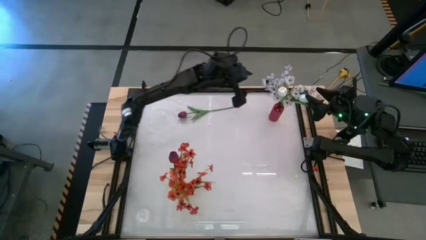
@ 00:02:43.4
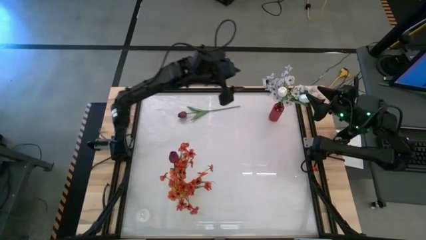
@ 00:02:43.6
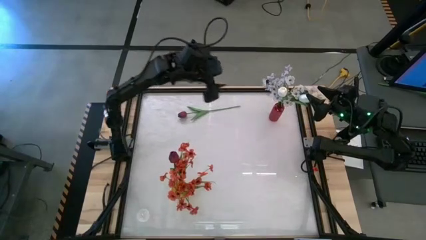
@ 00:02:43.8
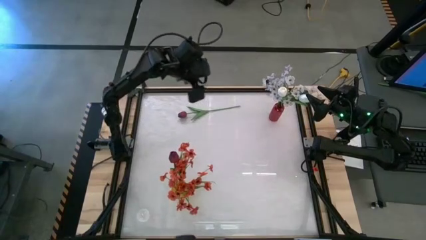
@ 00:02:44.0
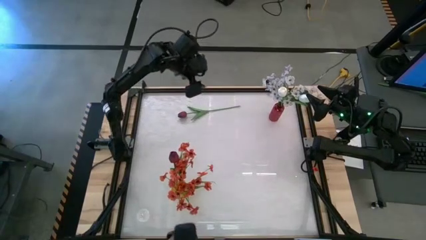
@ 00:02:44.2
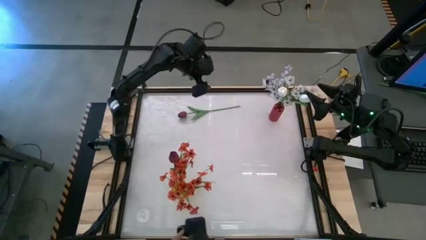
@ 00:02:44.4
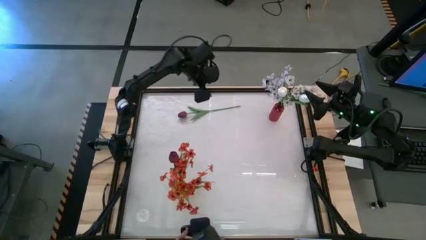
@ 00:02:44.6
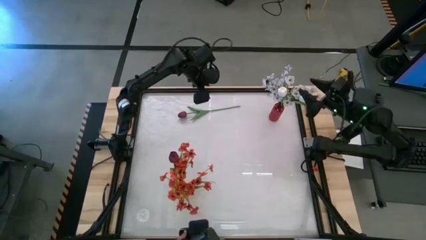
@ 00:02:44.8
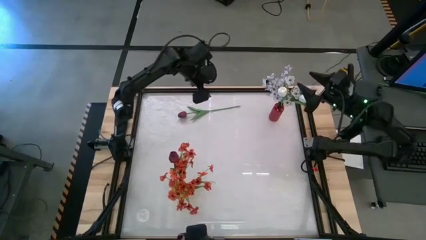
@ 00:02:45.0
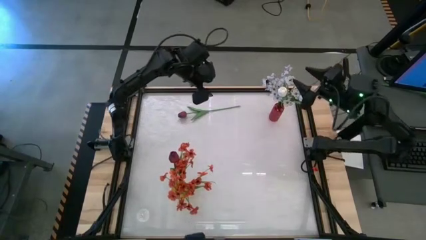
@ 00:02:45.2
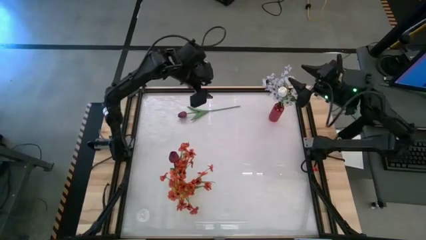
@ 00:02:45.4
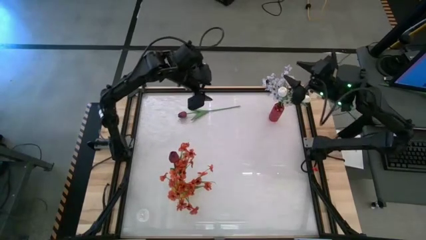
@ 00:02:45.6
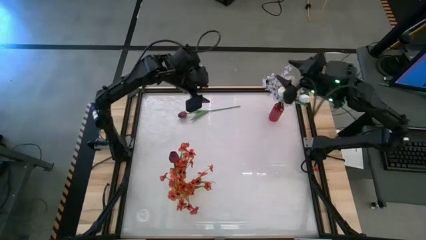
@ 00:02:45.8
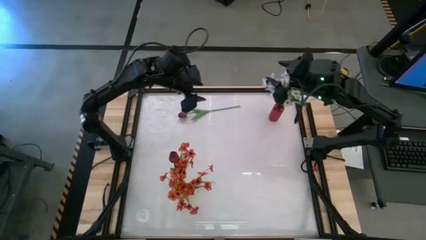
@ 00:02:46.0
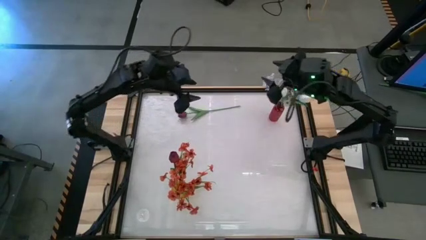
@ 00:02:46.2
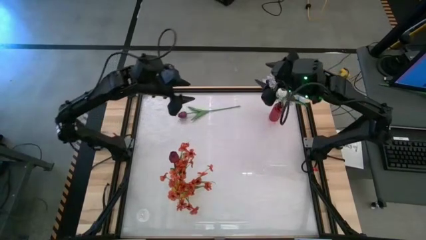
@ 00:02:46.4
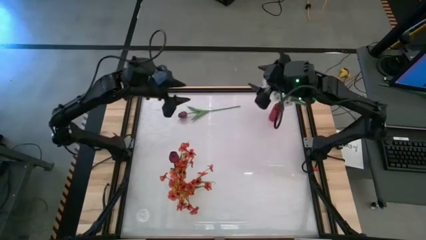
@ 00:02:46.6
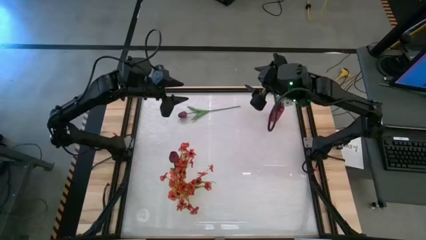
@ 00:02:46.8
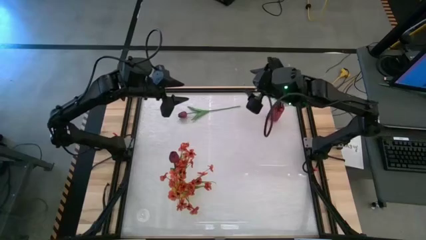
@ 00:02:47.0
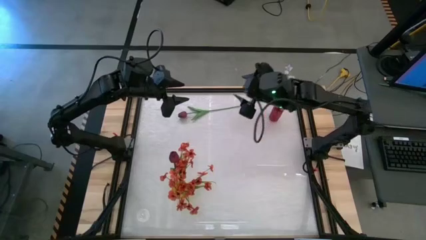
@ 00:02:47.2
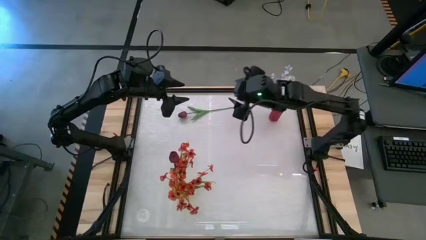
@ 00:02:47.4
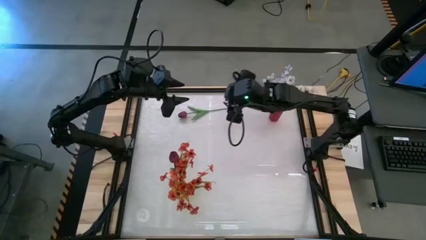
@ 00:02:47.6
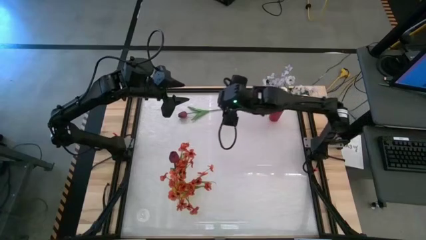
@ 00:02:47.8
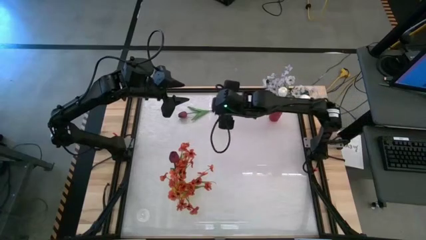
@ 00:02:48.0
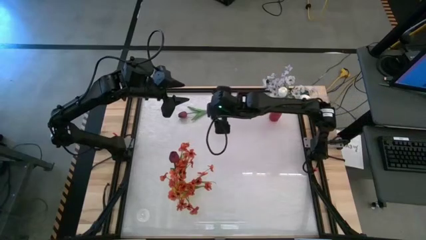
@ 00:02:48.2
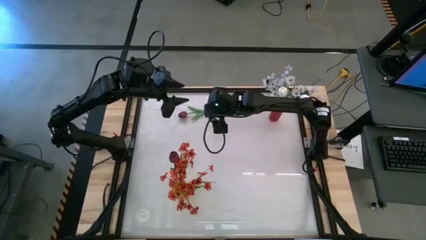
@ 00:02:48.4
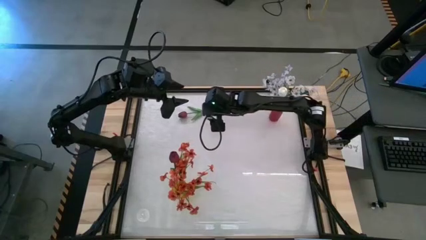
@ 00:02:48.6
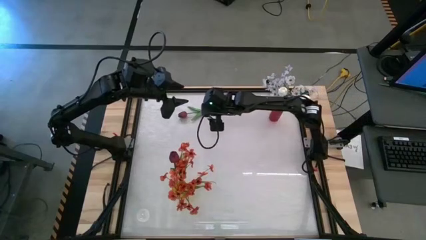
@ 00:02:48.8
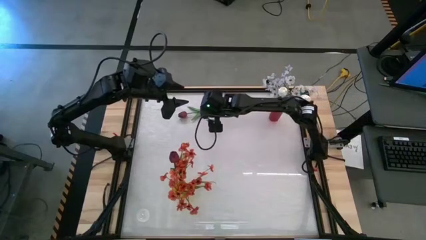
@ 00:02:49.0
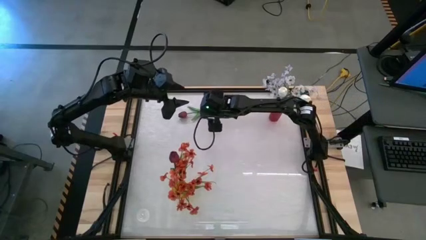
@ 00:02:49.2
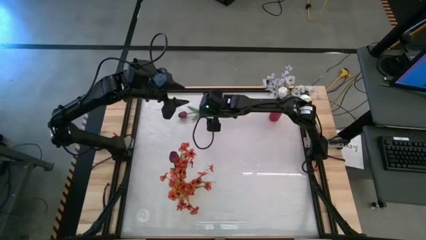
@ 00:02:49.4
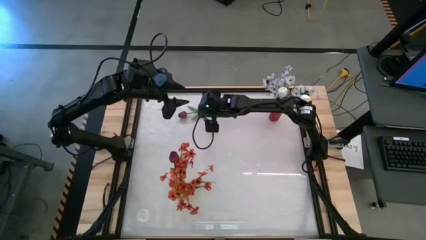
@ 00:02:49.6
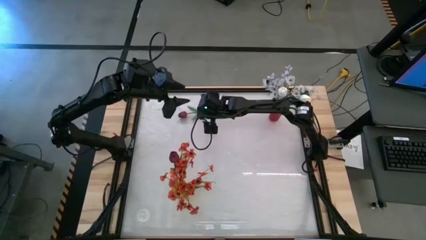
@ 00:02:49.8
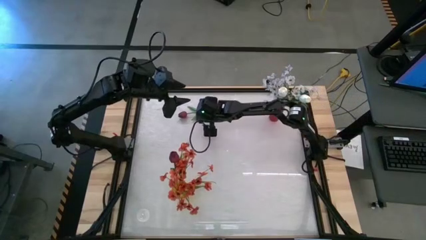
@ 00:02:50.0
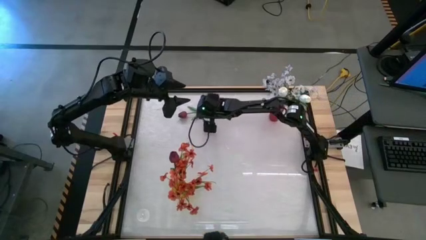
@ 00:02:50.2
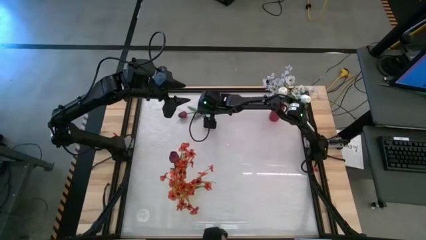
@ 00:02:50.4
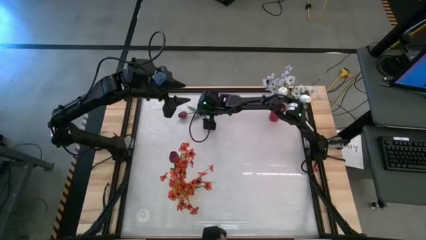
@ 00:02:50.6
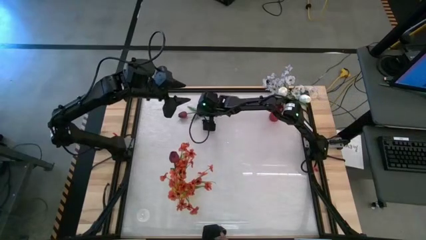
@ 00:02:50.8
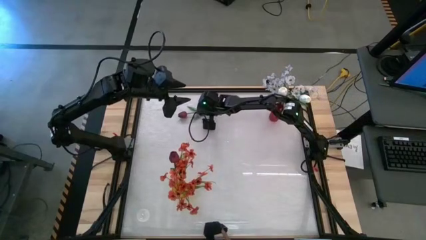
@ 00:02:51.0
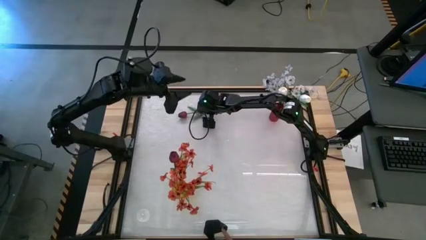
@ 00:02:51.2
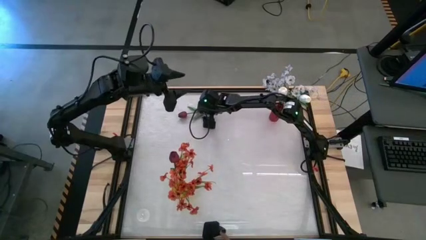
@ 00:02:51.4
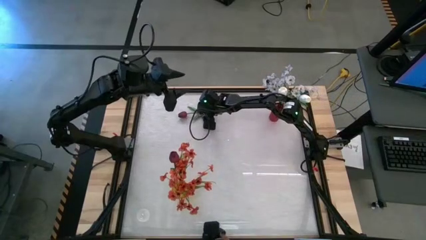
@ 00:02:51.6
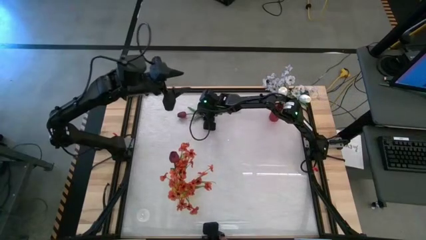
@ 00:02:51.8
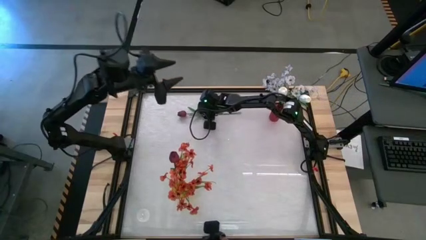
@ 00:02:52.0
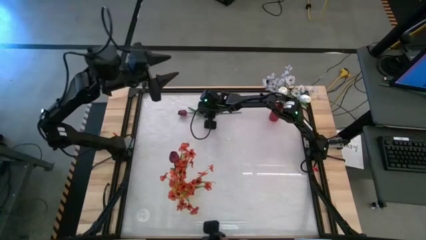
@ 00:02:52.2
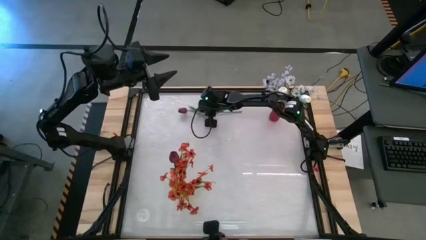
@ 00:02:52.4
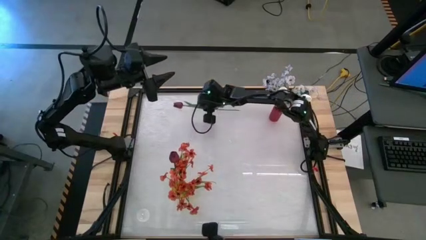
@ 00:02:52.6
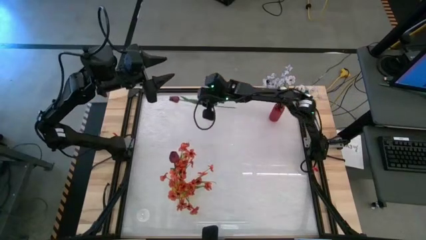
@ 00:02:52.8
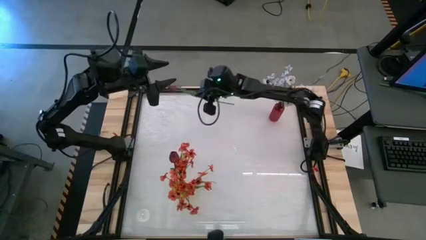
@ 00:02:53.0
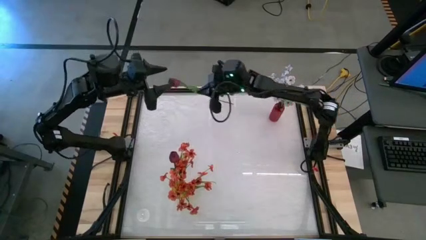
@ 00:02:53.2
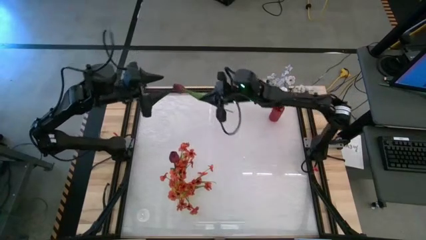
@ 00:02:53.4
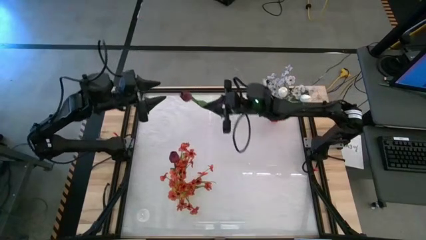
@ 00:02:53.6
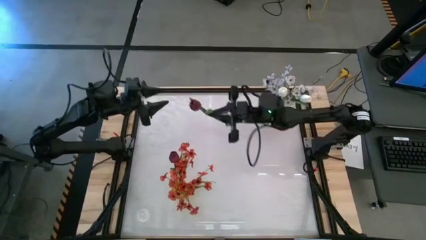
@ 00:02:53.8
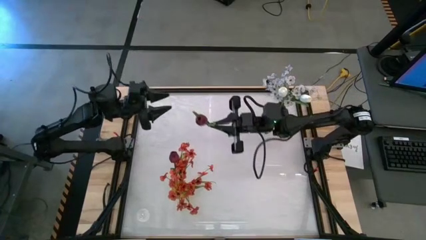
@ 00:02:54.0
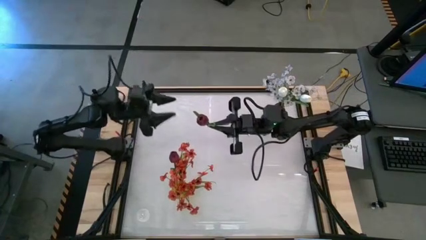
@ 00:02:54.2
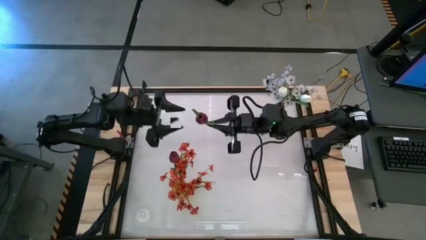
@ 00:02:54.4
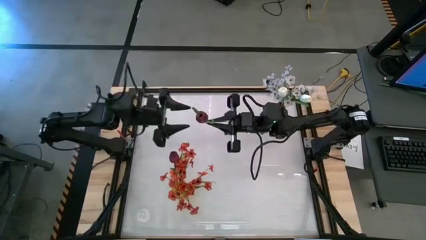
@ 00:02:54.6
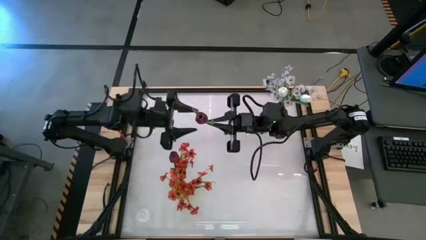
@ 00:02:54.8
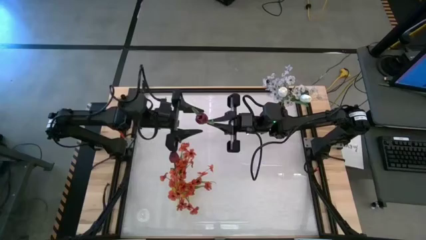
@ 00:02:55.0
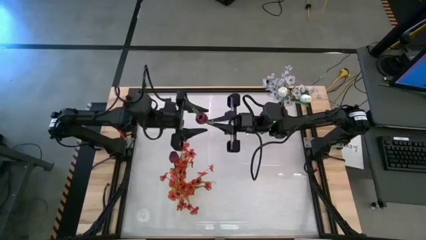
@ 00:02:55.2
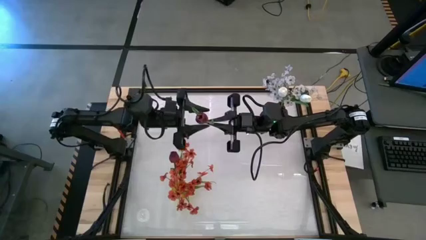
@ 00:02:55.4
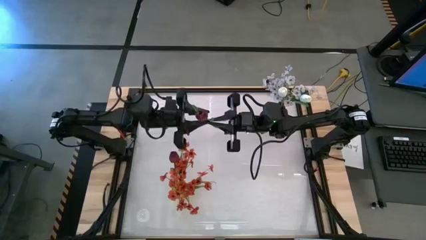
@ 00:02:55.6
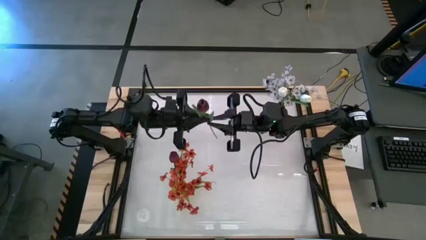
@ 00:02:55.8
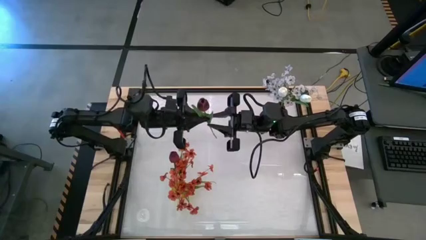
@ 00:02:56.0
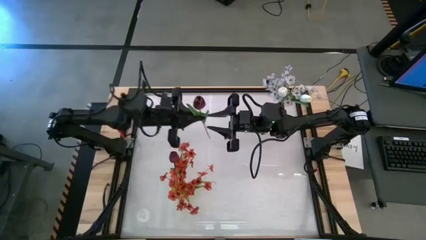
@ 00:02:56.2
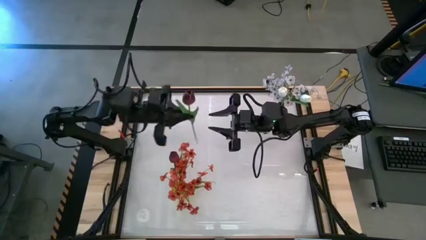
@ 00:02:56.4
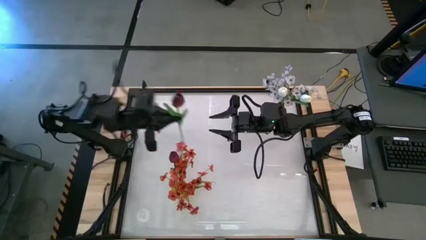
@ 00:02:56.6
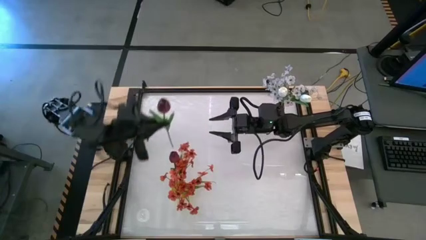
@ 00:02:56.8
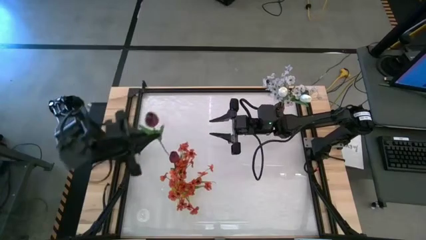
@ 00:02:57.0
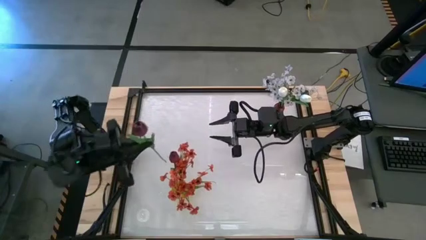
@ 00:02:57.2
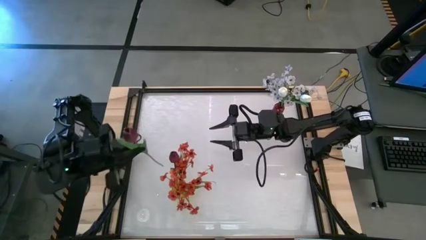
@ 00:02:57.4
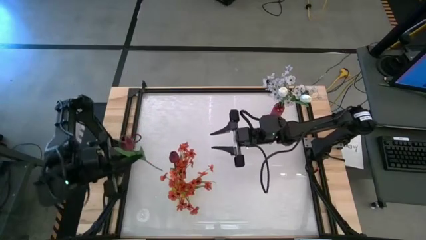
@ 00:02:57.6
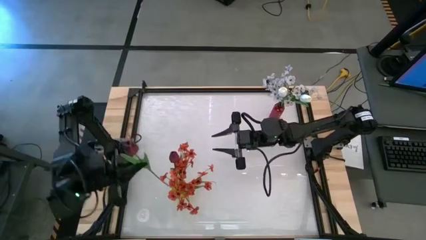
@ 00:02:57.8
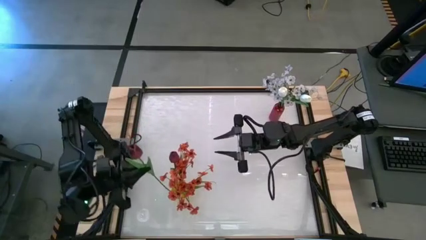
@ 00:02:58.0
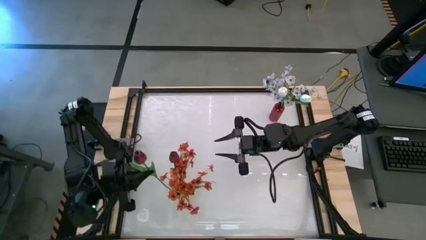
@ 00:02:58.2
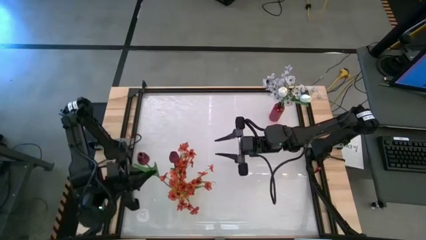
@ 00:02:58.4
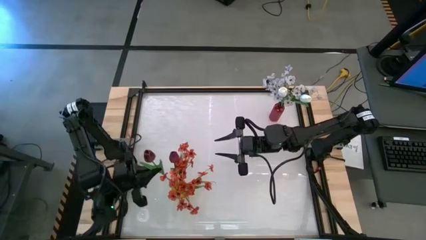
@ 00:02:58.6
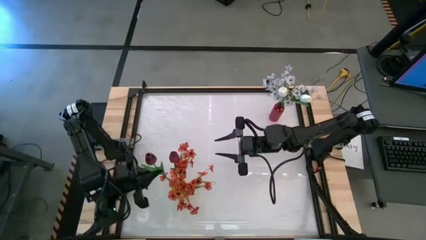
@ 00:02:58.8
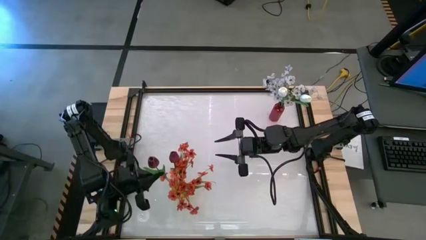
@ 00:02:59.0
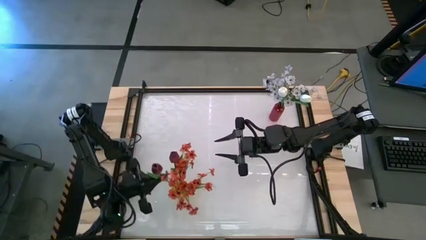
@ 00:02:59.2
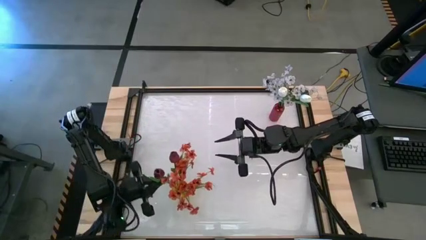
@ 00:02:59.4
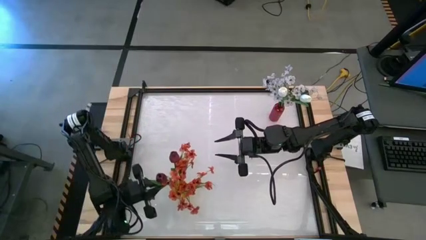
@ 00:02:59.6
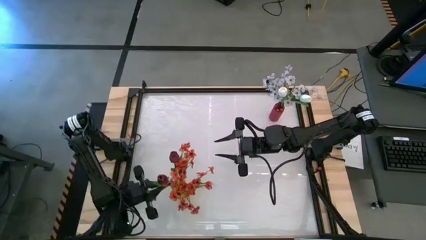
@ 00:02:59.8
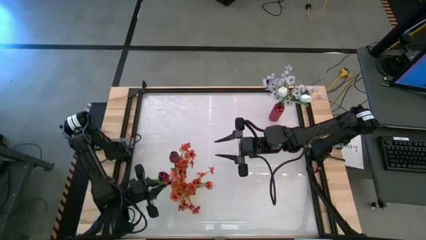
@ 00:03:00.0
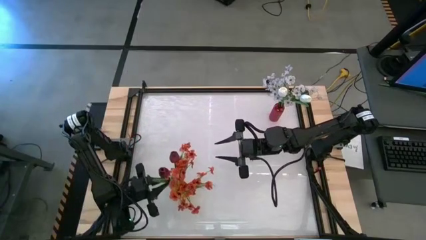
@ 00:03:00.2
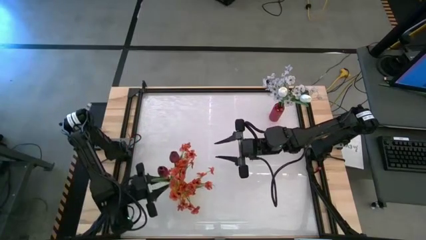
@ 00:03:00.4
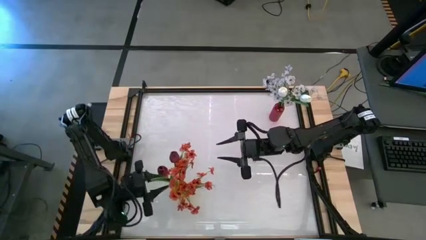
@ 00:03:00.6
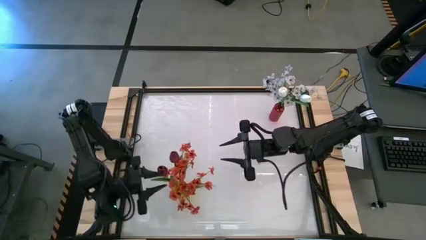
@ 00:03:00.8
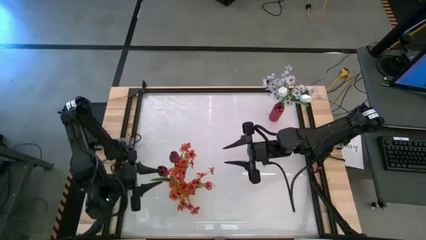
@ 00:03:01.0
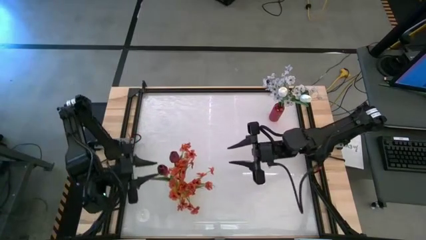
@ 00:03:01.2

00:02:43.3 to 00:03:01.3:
Task: Sort flowers into vase by color
Put the red tulip into the red vase
